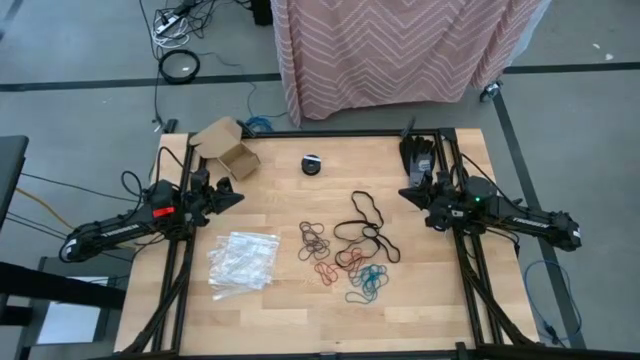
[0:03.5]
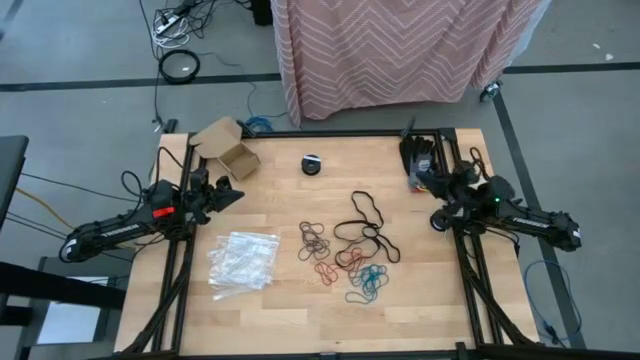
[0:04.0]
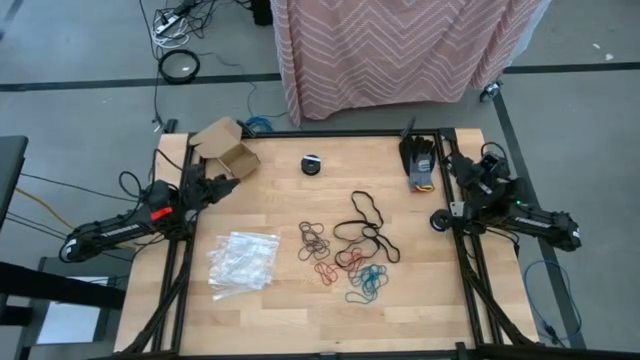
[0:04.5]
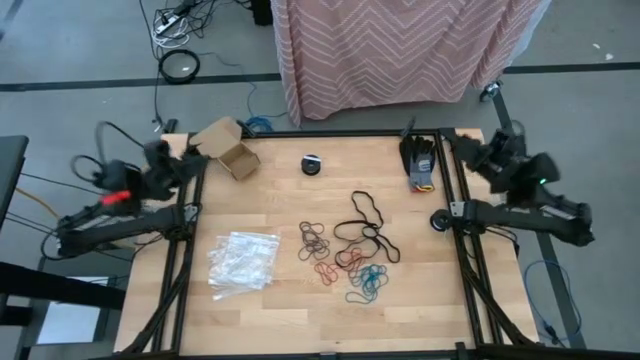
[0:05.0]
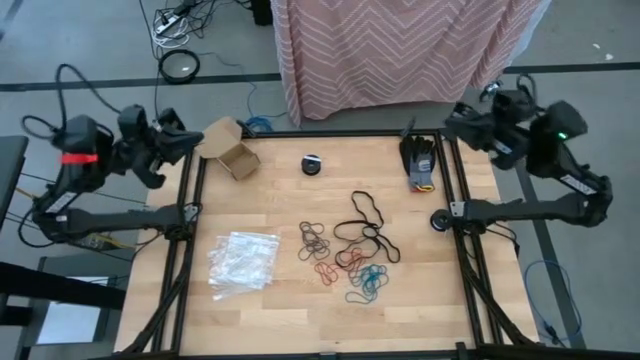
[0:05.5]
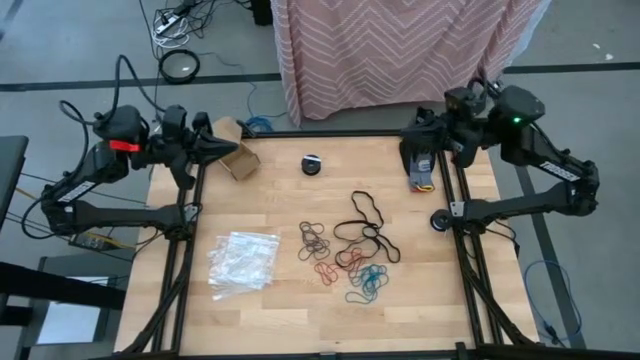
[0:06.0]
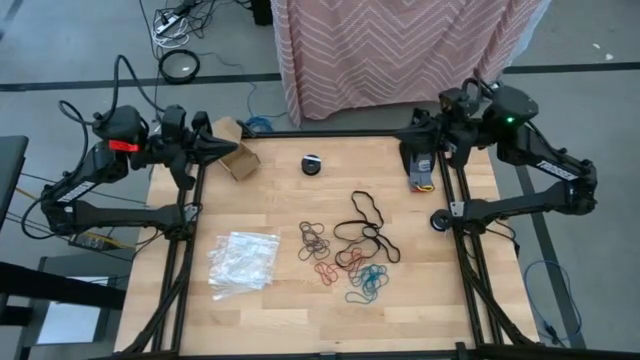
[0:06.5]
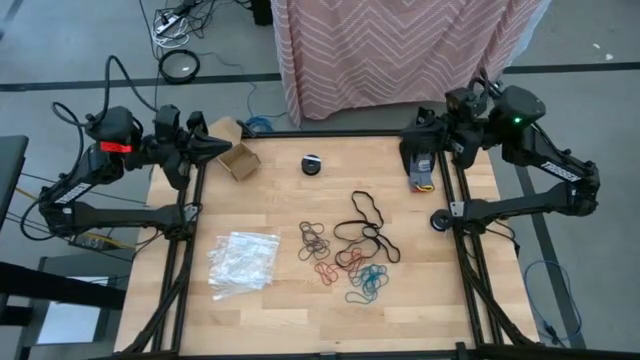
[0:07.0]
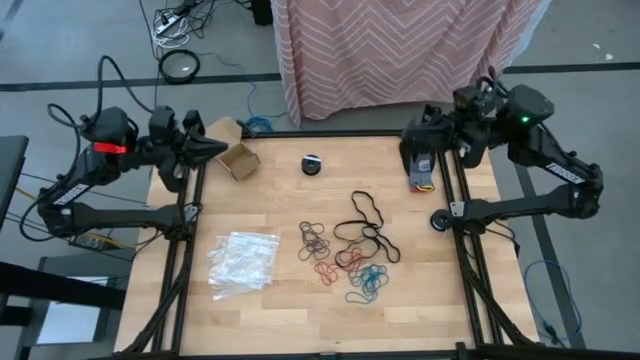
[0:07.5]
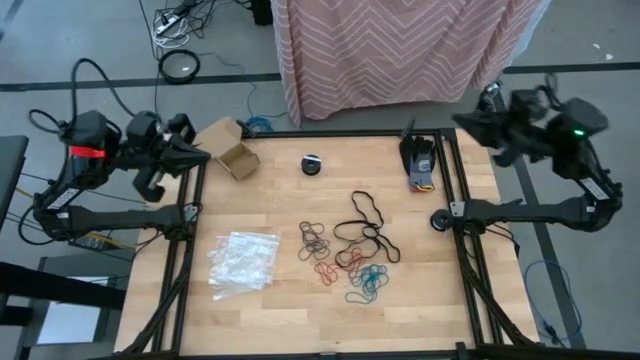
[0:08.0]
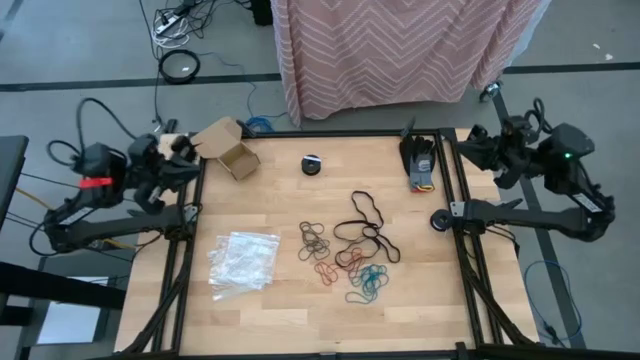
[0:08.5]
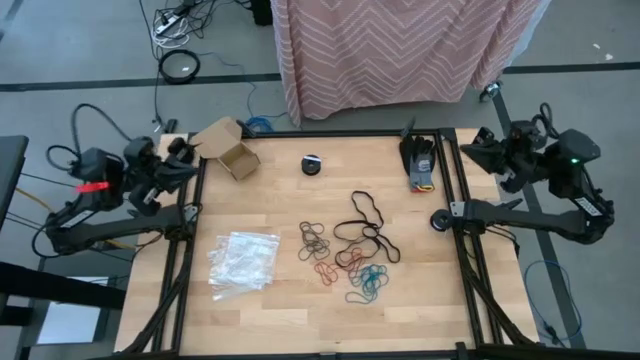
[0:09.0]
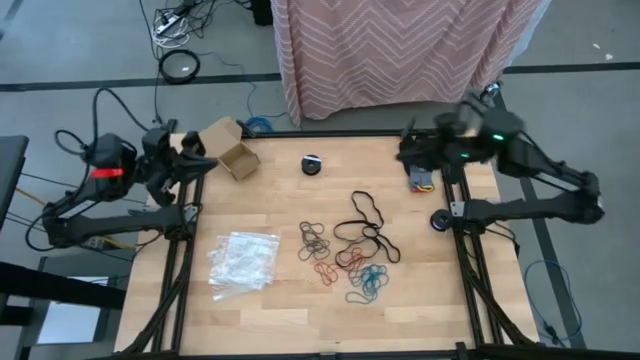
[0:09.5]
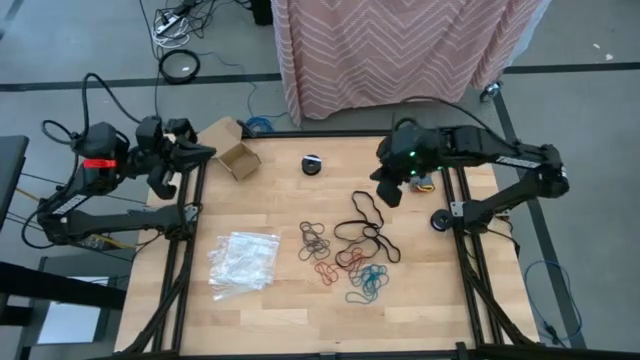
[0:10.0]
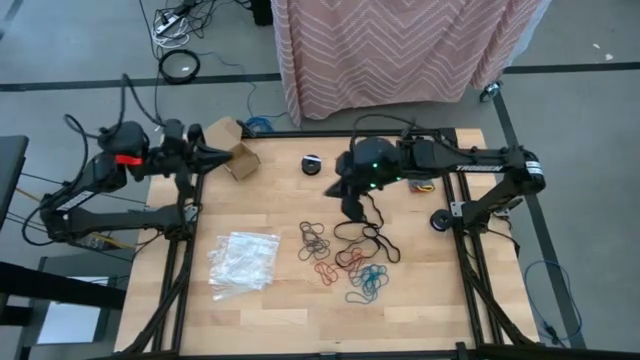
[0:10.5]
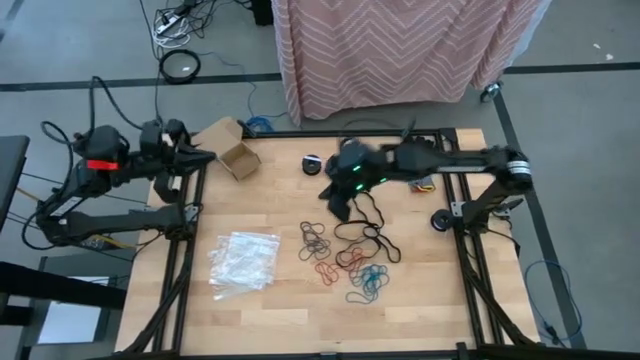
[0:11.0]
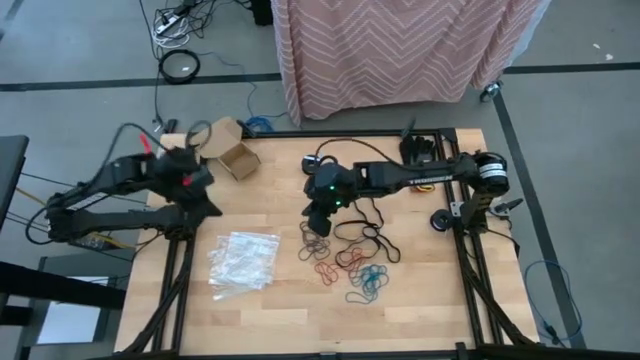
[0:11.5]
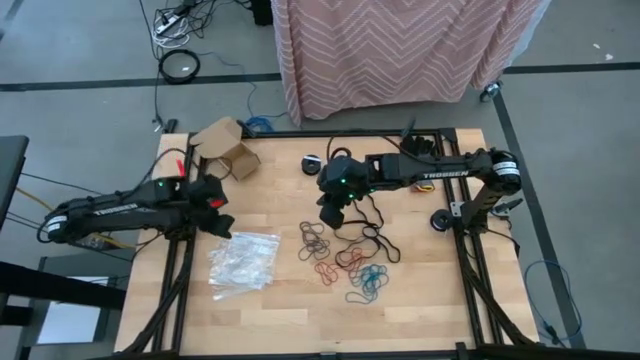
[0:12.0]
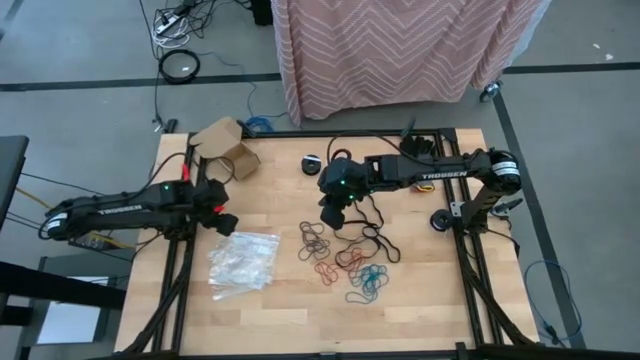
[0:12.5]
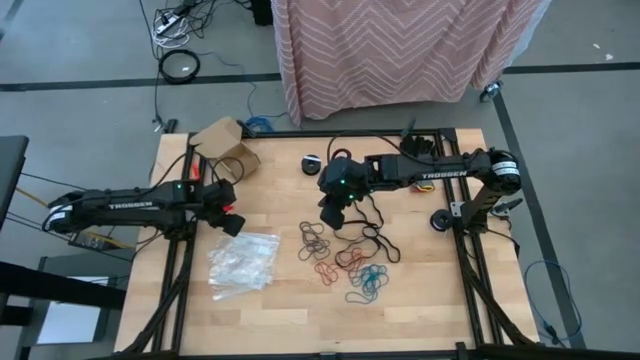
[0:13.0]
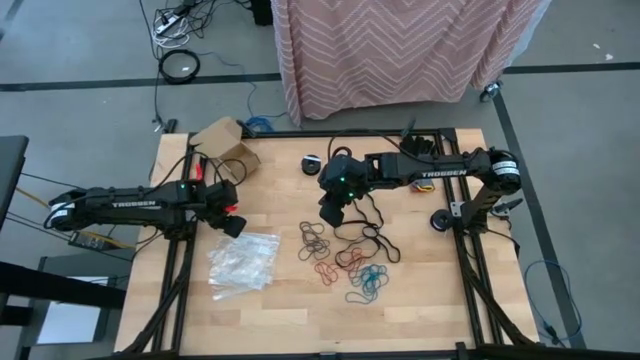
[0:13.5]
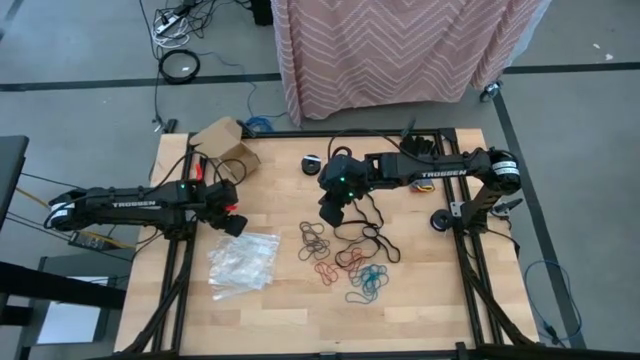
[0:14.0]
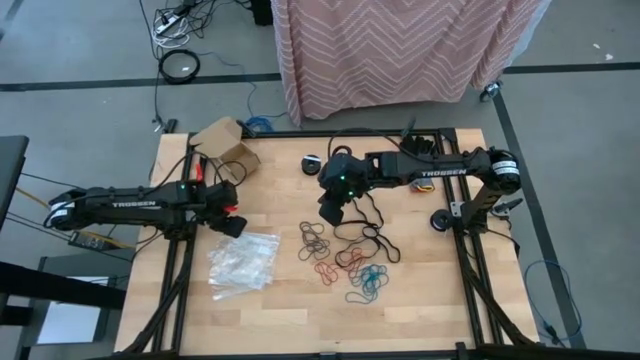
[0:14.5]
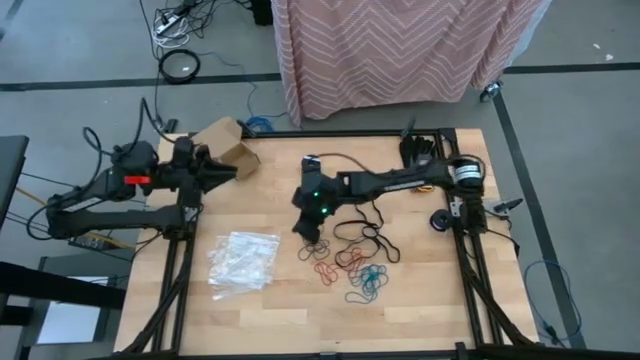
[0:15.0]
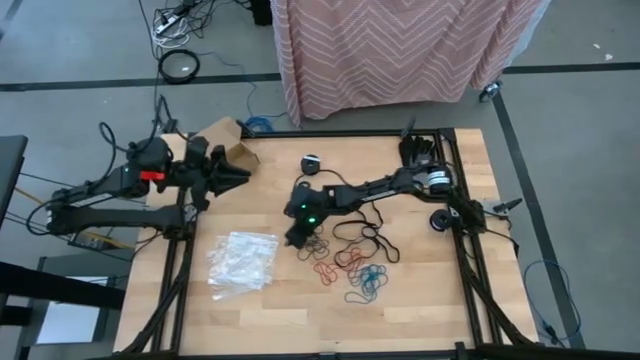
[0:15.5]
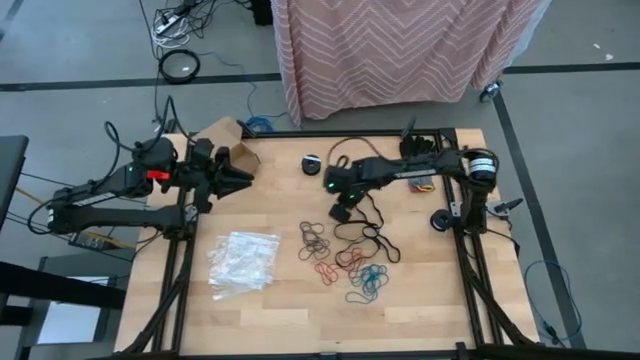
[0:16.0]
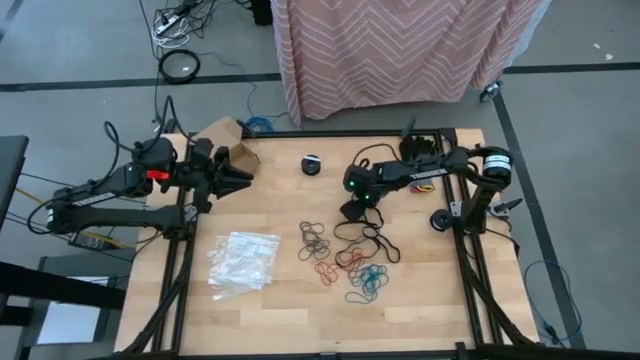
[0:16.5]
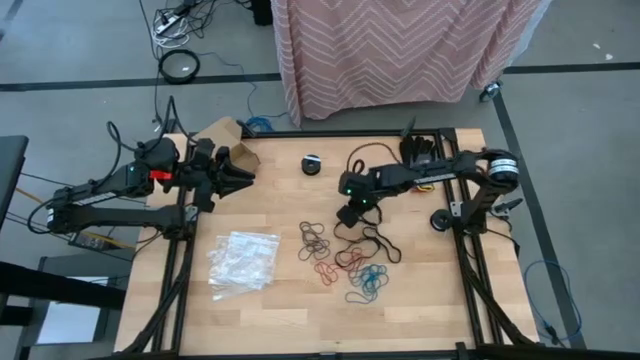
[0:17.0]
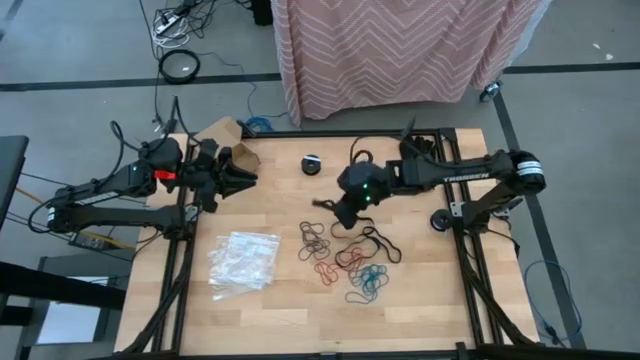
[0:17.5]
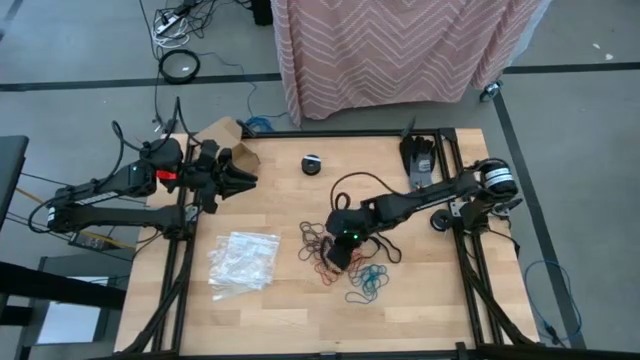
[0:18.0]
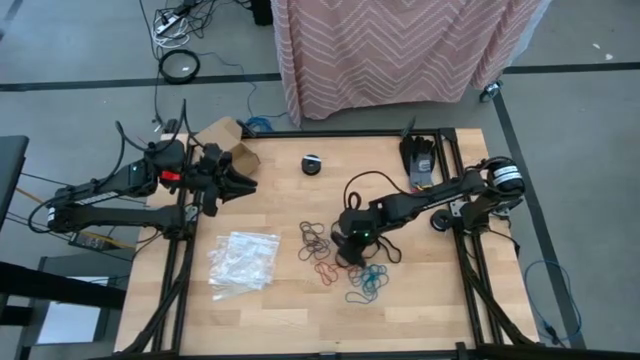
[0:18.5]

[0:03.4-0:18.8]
Task: Sort rubber bands
Put the black rubber band into the transparent zip bag

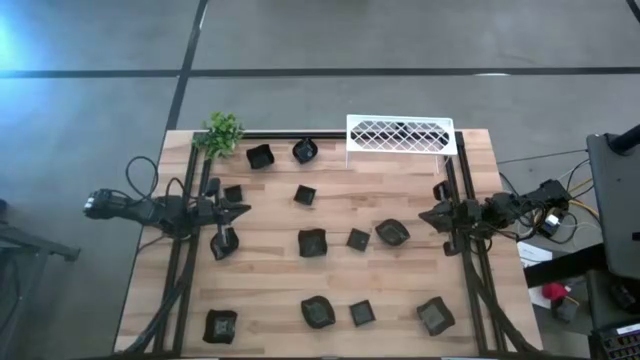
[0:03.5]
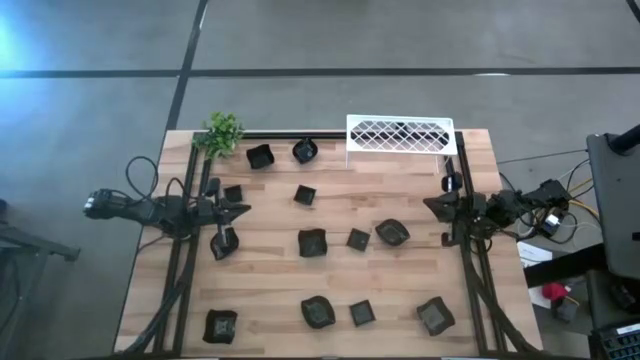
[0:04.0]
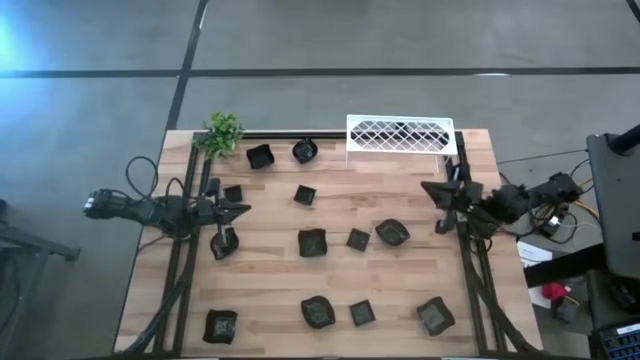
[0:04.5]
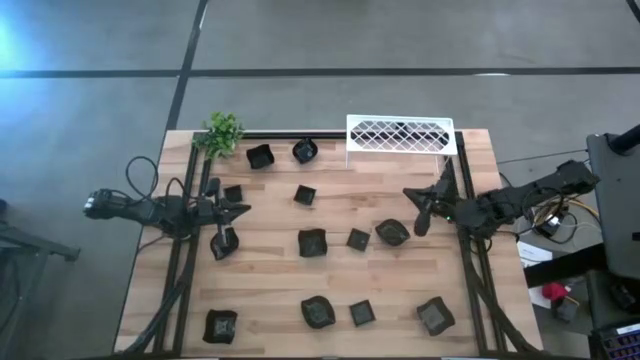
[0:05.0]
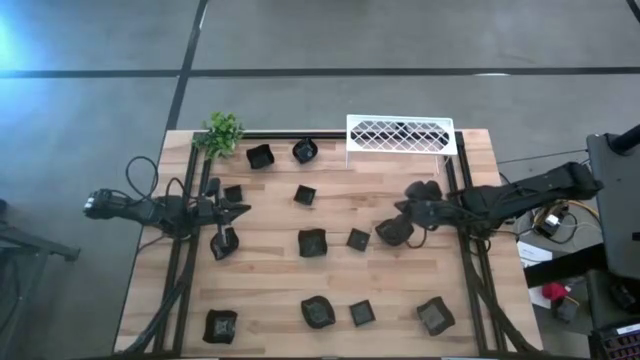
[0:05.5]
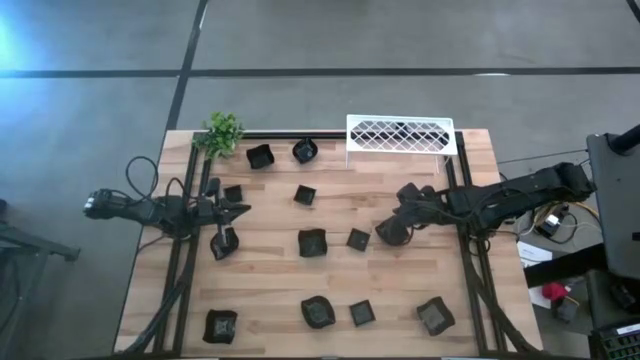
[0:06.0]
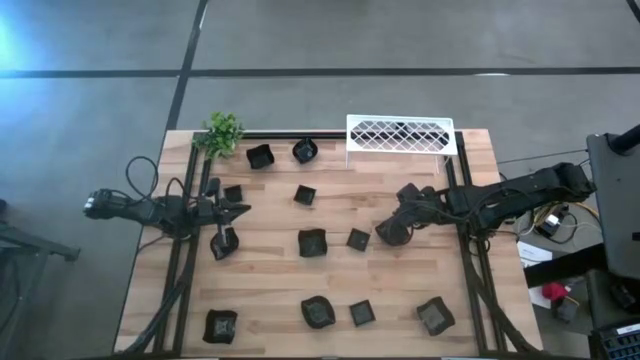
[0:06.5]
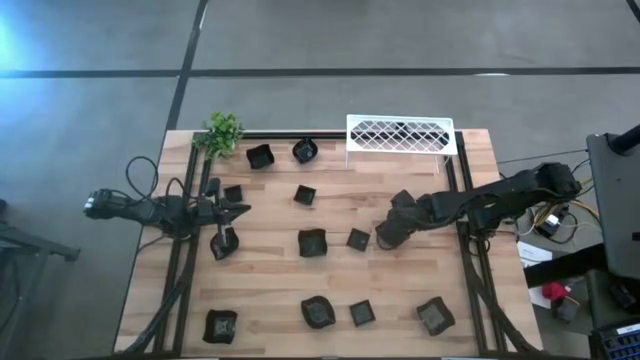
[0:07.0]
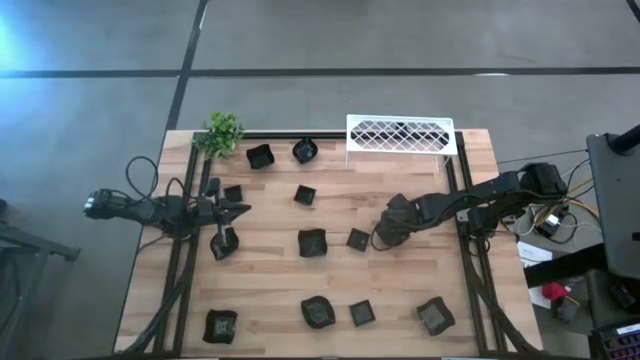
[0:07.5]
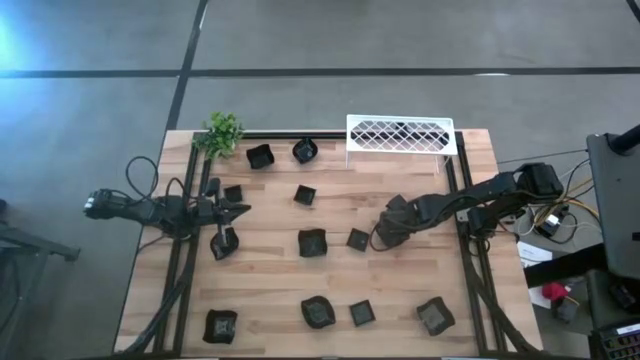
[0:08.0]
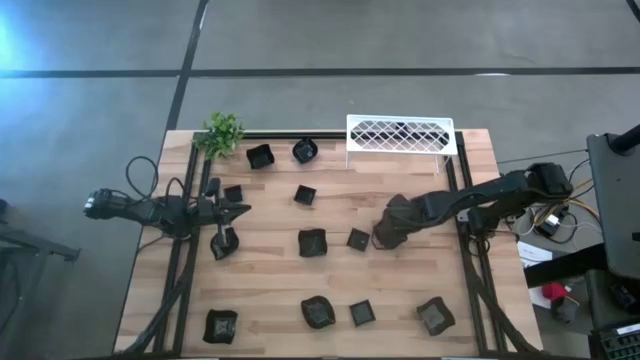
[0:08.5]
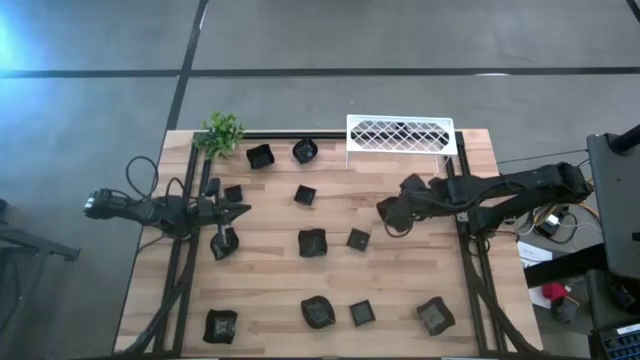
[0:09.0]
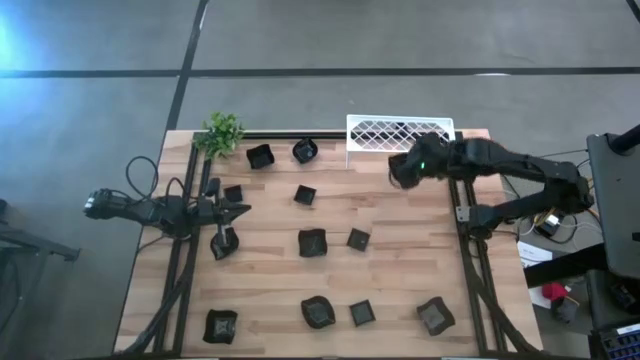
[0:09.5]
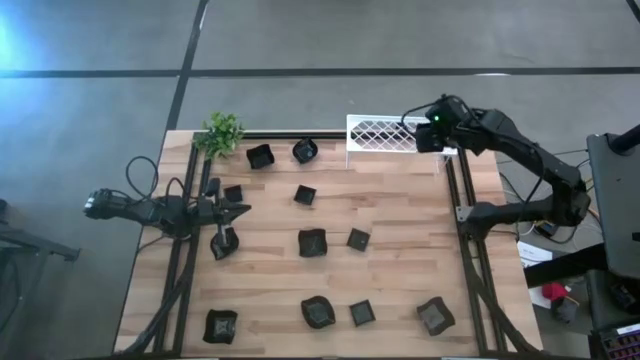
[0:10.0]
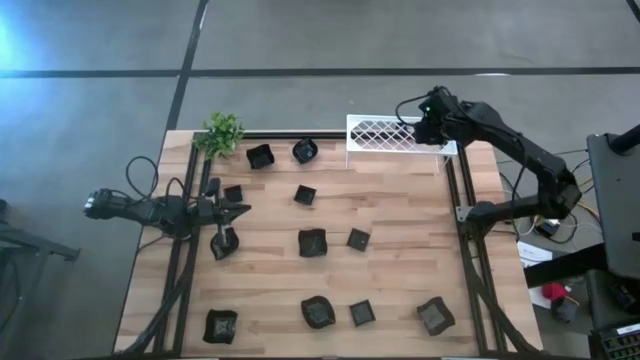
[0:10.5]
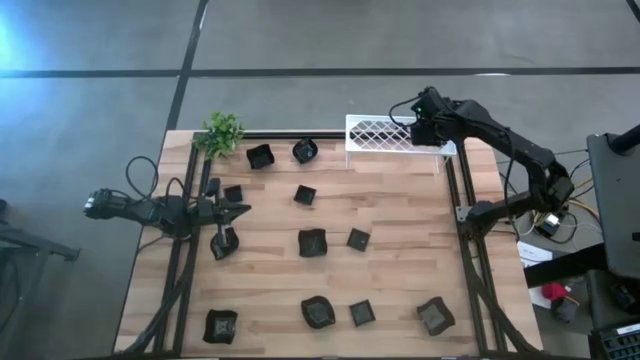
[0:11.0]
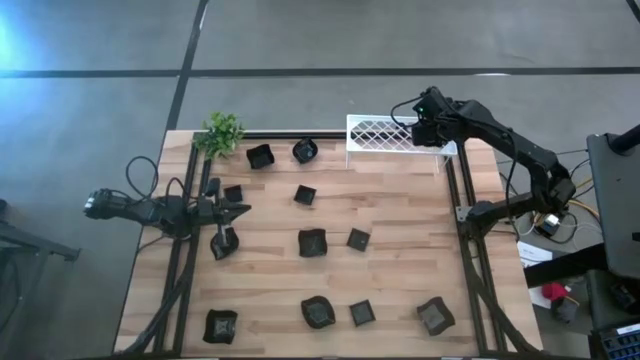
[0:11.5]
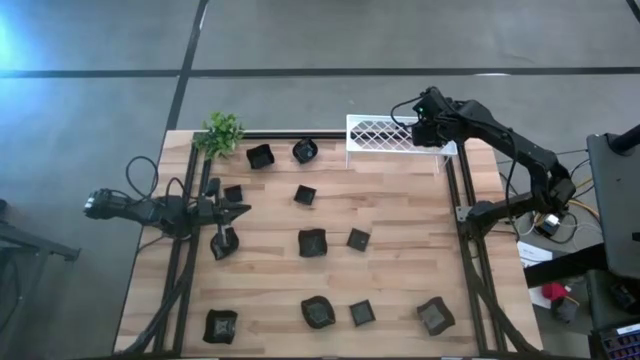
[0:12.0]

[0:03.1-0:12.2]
Task: Pick & Place Mini shaped plates
Put the black leaf-shaped plate on the shelf
